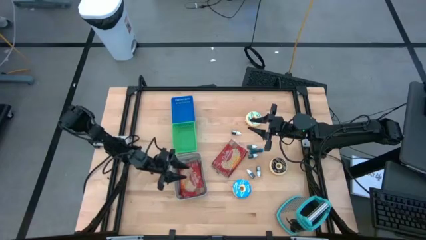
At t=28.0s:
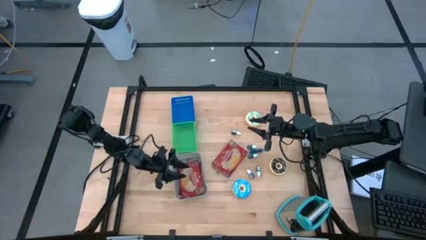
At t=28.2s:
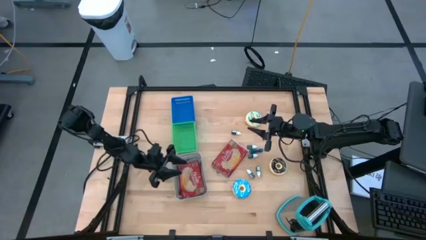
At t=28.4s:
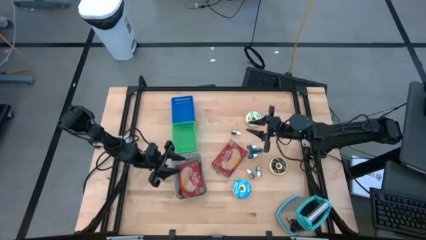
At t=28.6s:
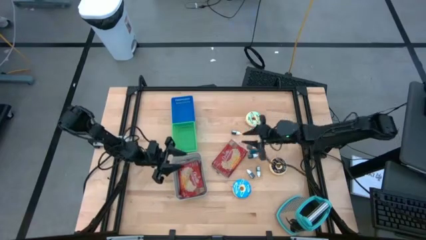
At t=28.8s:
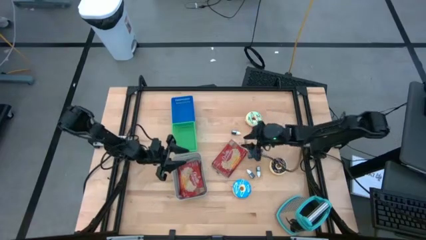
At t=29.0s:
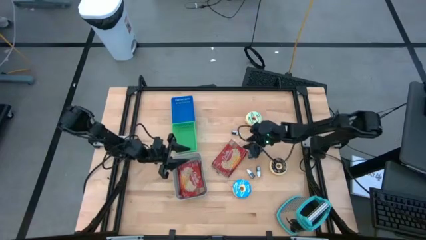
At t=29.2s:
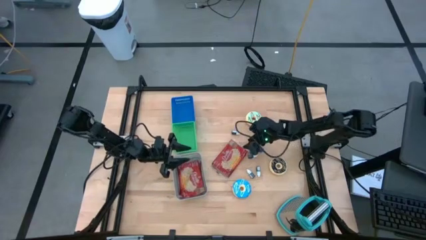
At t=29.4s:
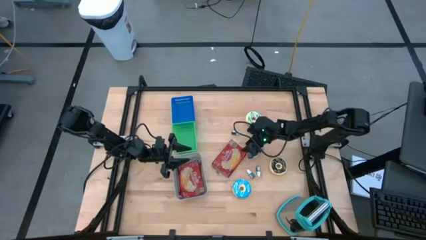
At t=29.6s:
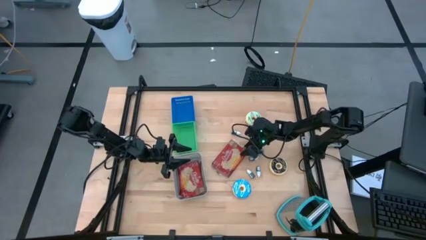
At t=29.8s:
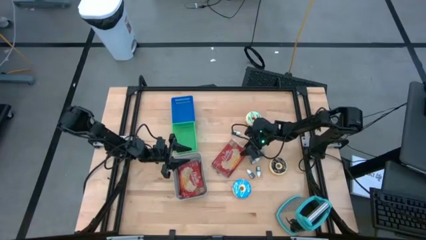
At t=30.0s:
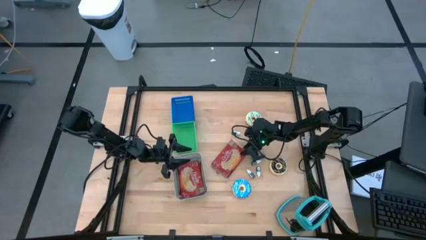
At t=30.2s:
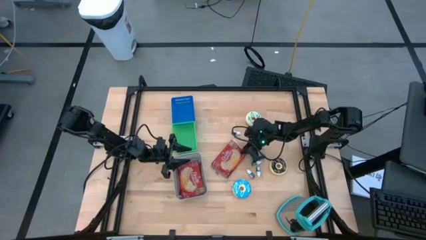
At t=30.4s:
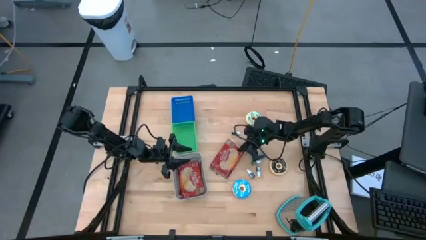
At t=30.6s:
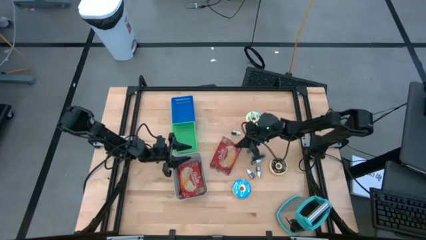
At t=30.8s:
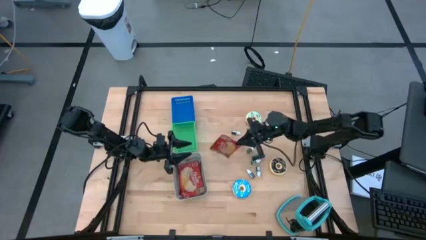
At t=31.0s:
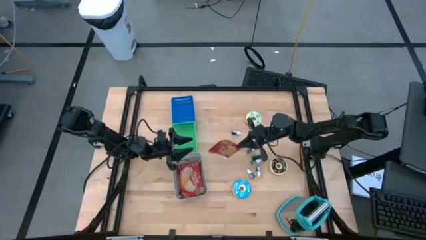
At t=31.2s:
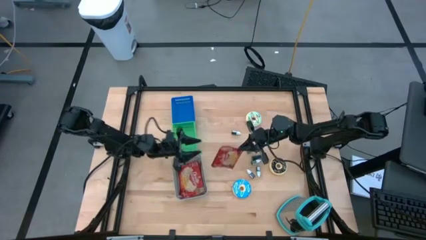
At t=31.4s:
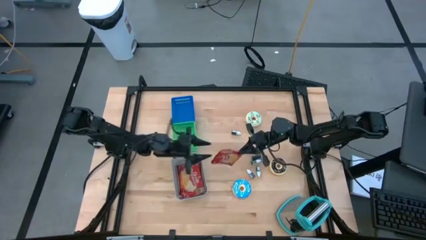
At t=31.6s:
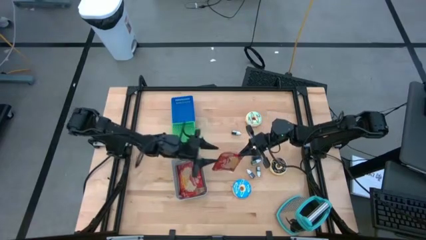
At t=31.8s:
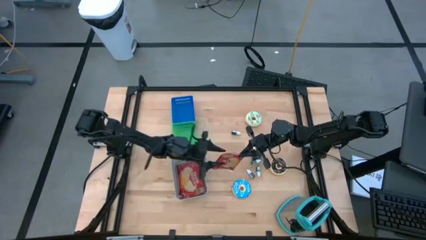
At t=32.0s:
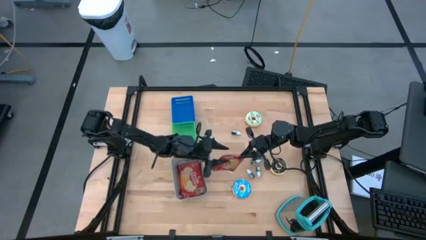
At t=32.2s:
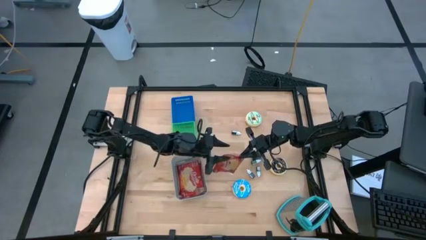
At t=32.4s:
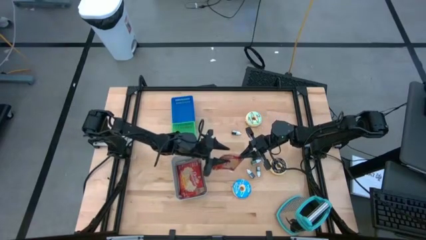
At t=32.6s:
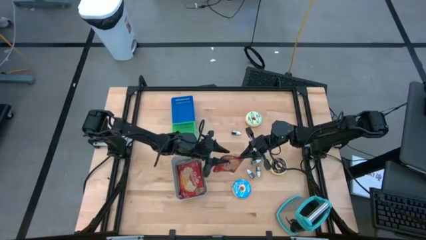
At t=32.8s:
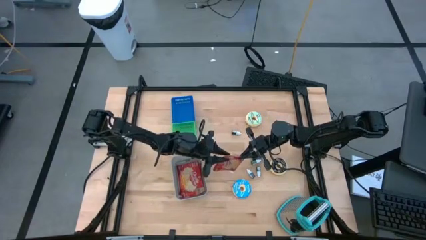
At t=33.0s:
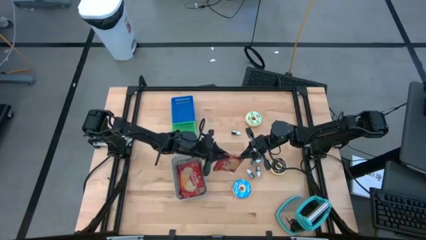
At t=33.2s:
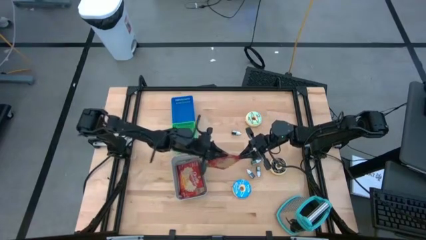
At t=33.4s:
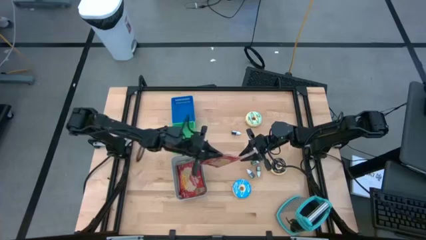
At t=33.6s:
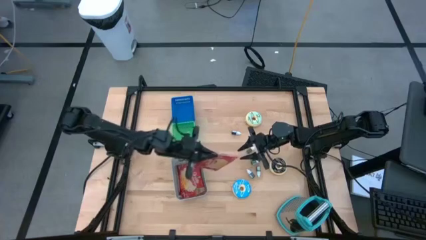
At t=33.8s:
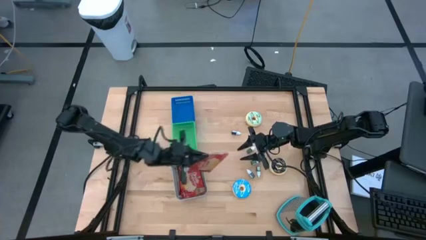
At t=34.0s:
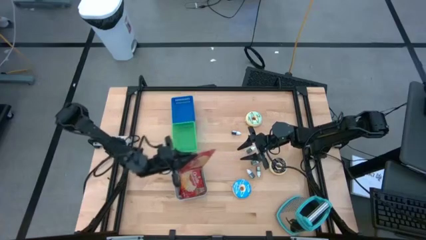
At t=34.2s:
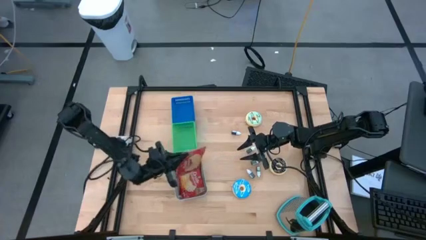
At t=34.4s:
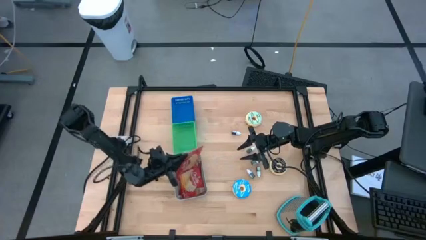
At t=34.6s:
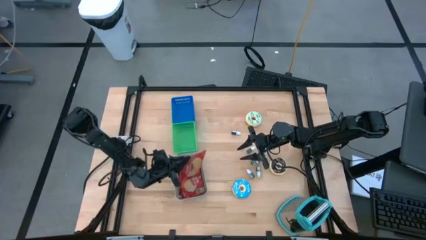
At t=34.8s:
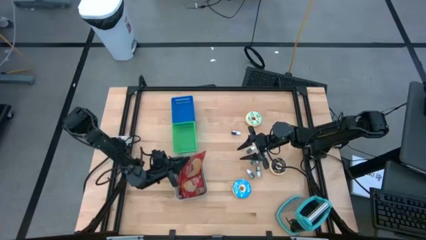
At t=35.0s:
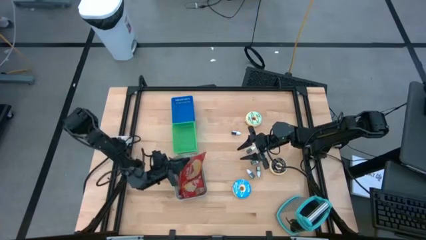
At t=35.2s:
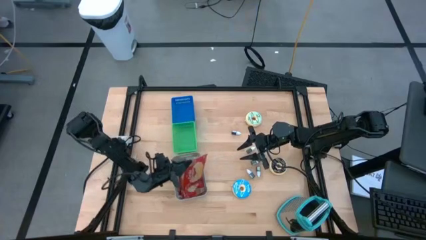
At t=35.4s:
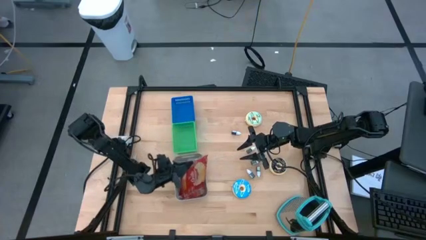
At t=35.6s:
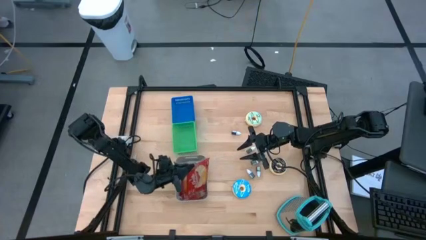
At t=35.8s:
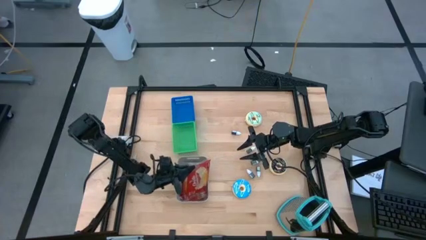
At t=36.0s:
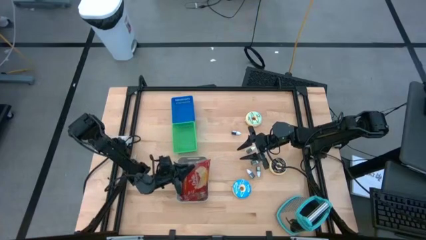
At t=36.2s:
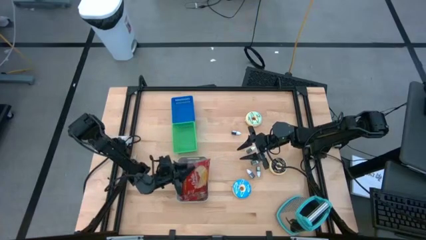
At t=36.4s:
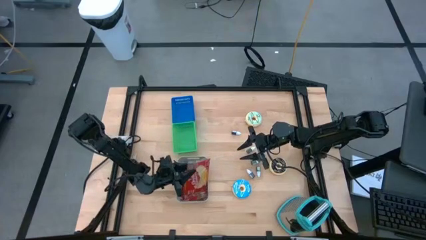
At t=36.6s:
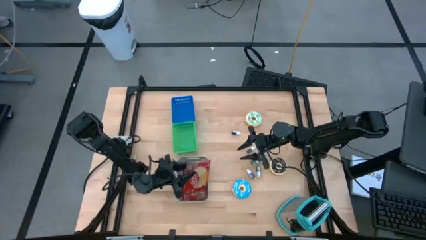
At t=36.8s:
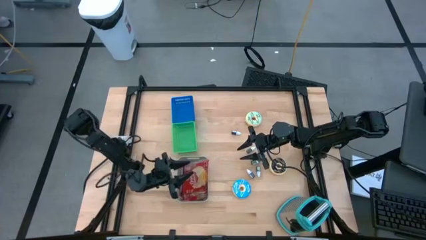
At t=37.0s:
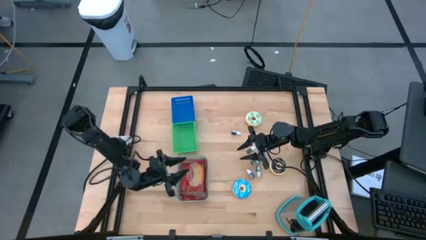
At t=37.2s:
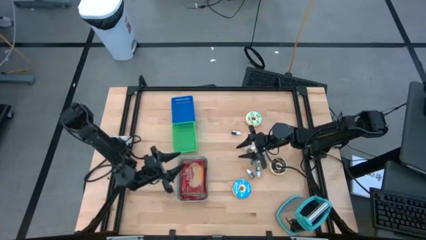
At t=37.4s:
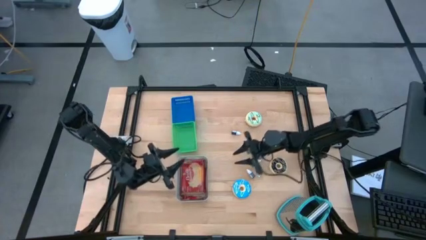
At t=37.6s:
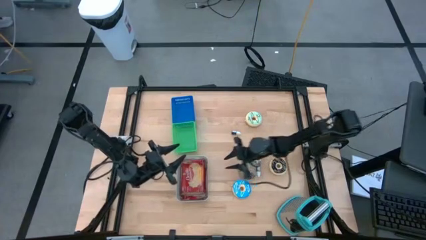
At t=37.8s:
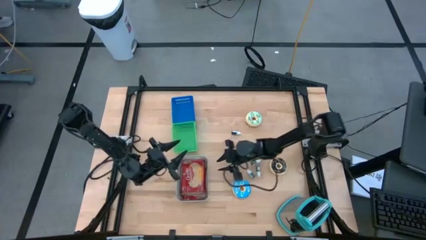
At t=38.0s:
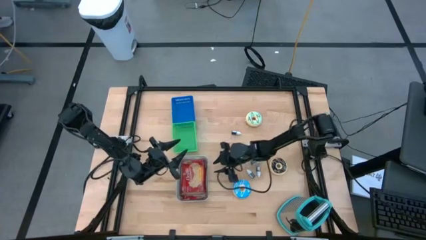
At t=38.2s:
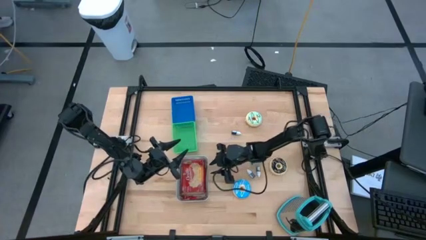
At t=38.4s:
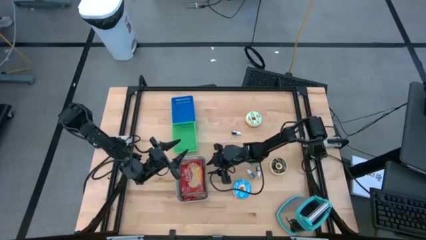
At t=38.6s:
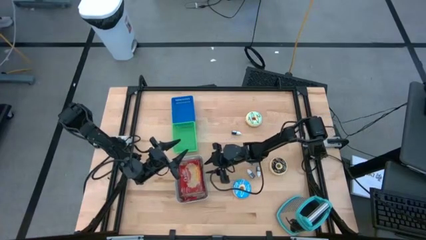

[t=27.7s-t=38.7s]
Task: Pick & Place Food Item
Put the popcorn pack into the gray bin
